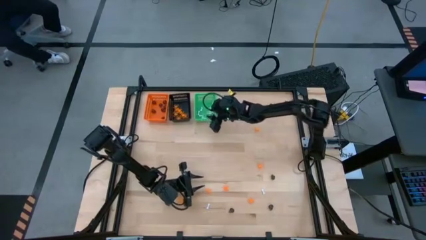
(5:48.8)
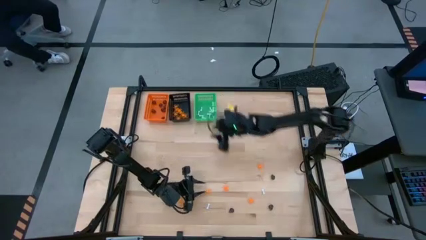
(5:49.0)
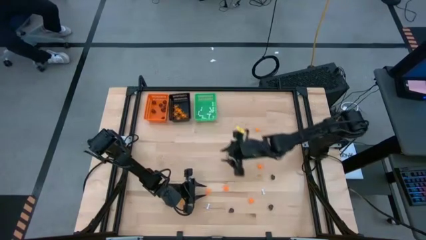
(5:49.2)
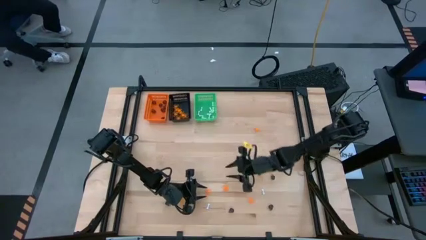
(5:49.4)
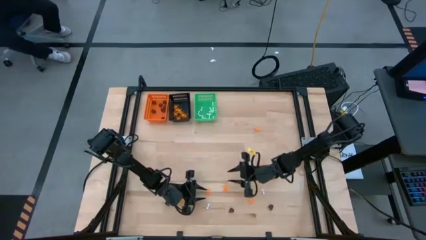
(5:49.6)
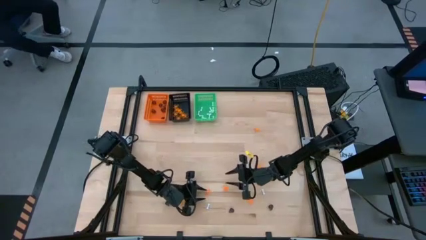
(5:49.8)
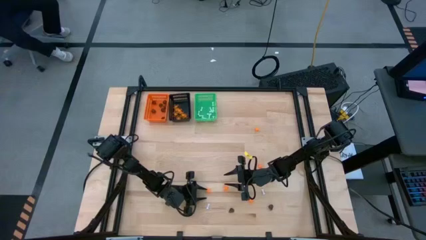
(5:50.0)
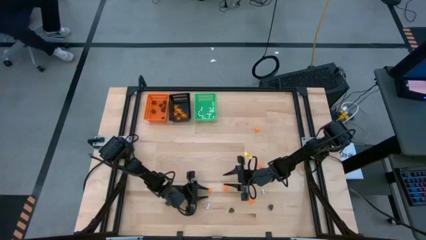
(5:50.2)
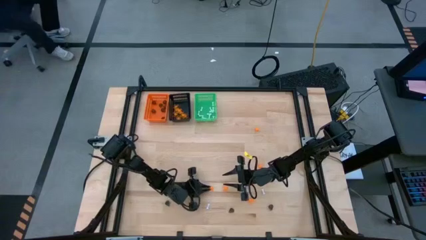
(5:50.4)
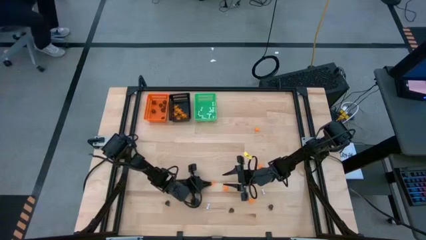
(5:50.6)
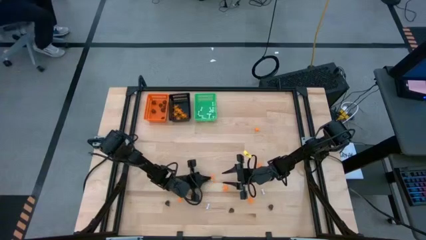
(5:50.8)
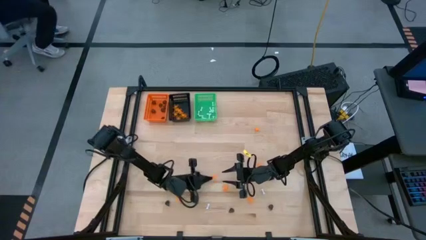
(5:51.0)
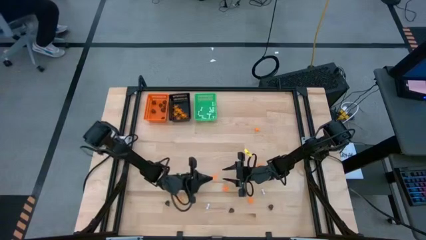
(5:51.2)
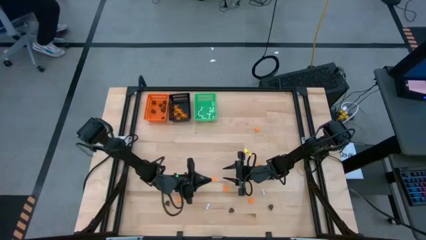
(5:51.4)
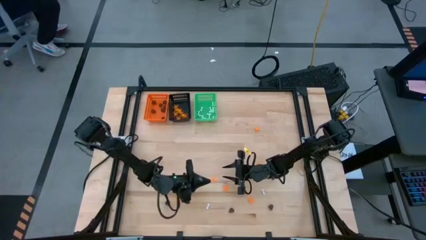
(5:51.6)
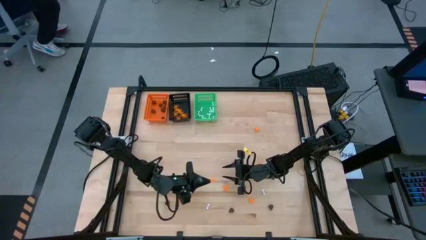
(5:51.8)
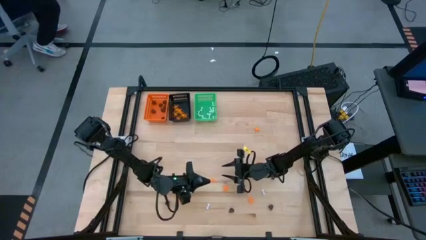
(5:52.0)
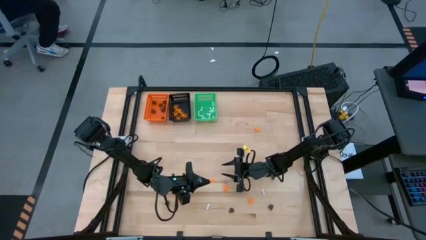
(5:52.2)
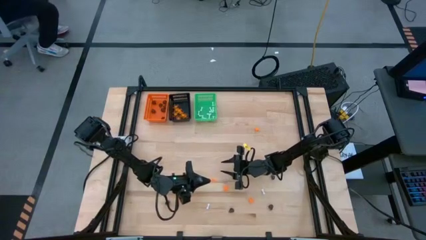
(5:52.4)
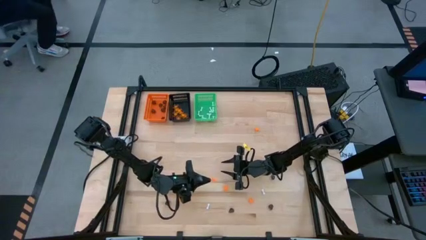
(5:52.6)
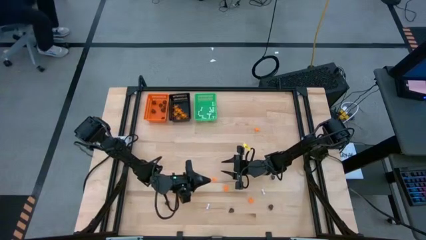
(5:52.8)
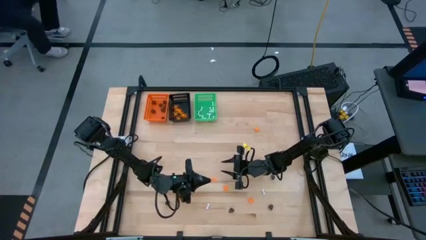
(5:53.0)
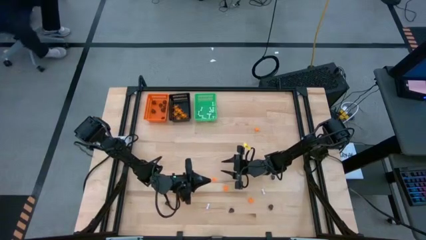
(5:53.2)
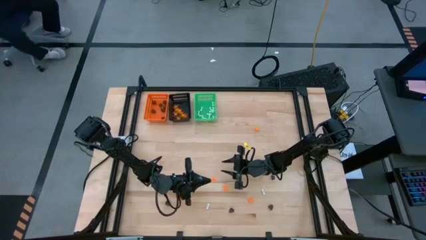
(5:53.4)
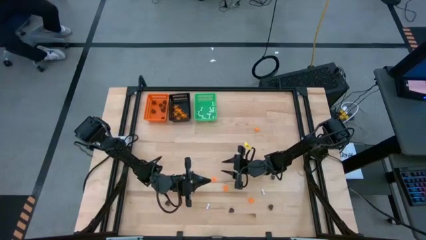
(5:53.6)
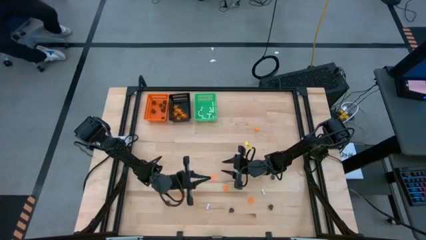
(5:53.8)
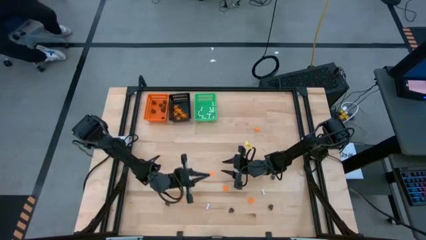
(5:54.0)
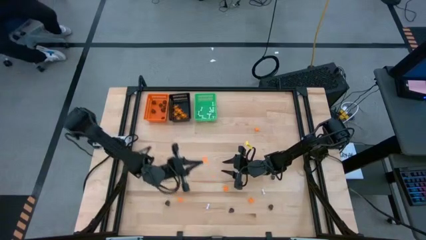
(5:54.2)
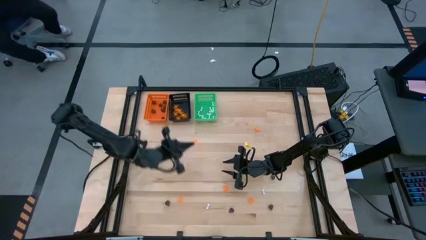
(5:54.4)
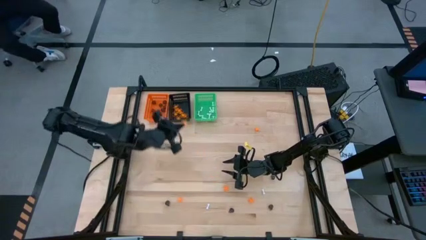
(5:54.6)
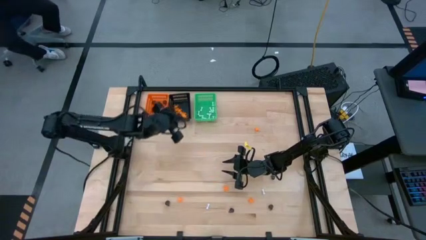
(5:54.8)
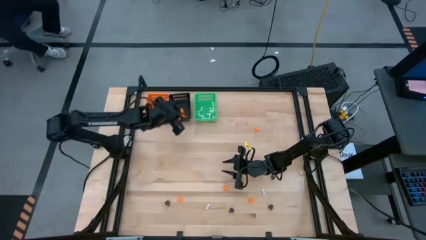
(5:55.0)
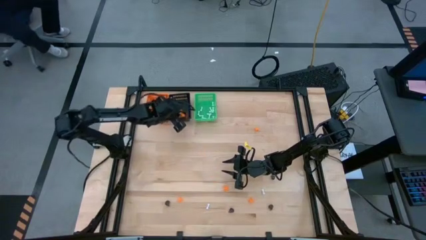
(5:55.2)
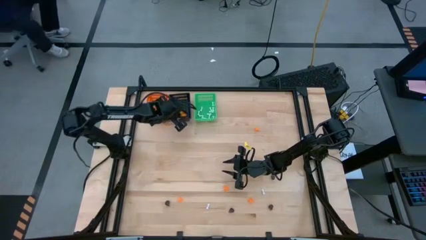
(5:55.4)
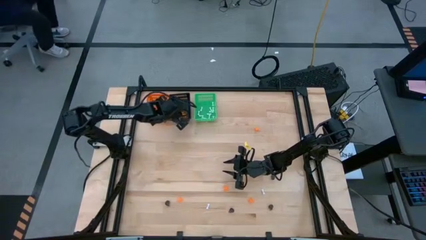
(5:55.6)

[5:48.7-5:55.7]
Task: Sort Halloween decoration
Put the orange spider toy into the black bin

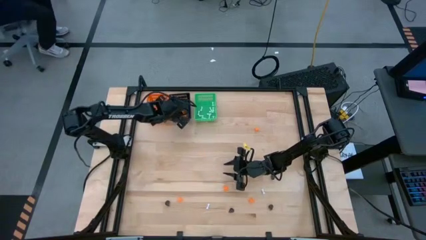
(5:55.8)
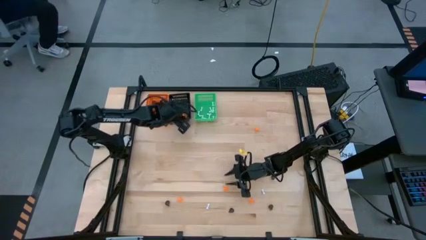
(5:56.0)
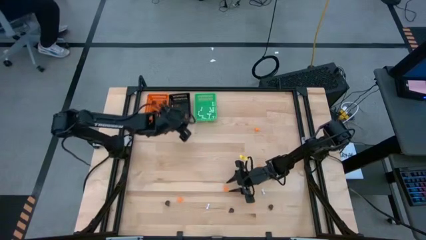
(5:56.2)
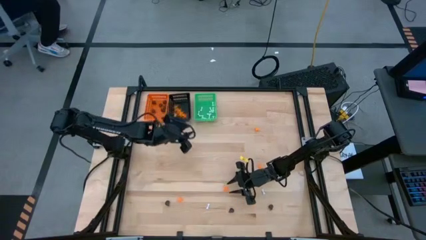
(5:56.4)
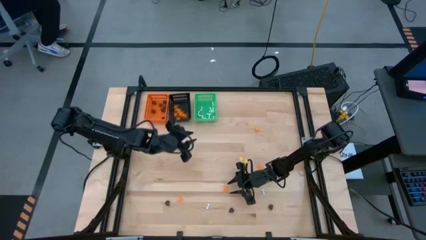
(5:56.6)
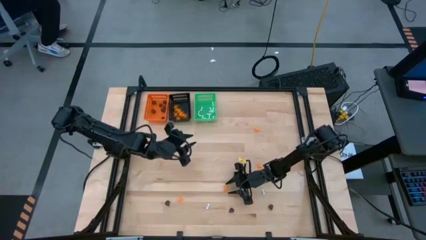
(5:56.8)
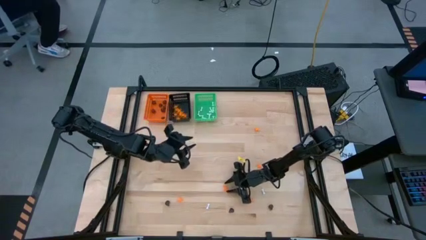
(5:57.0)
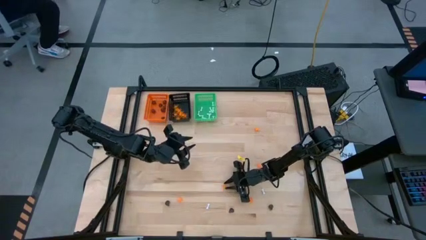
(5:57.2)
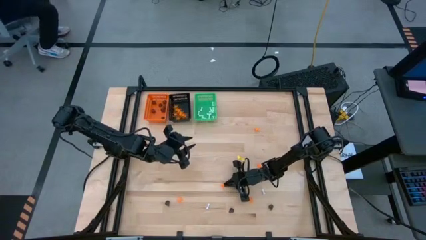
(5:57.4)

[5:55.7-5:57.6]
Put the orange spider toy into the black bin

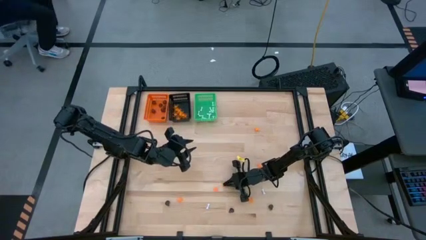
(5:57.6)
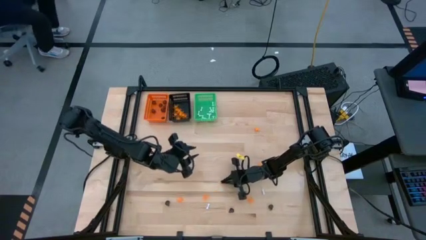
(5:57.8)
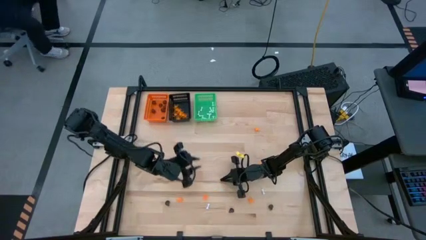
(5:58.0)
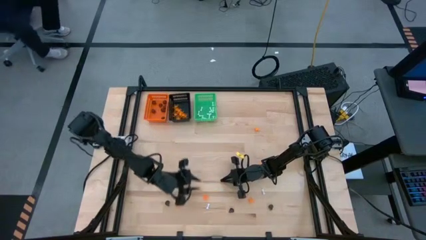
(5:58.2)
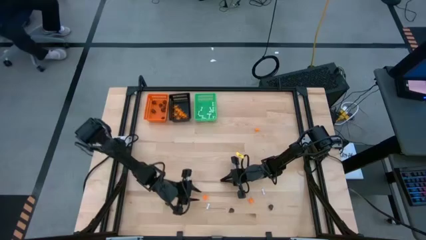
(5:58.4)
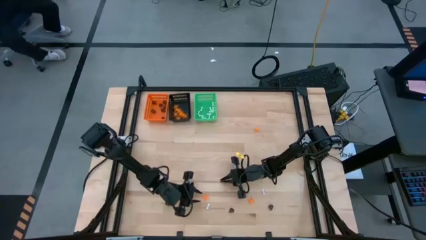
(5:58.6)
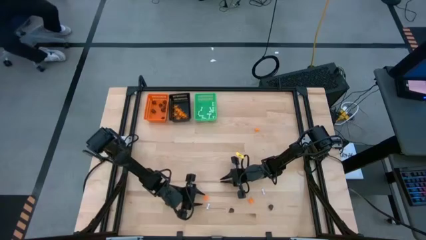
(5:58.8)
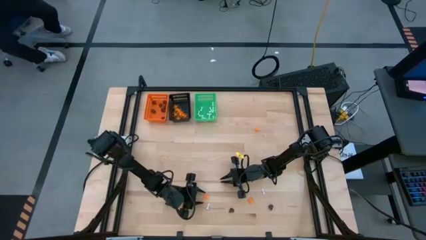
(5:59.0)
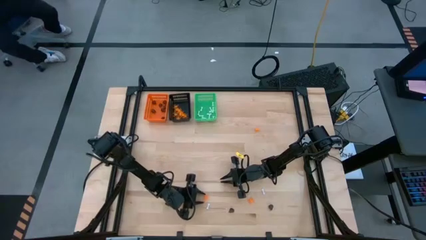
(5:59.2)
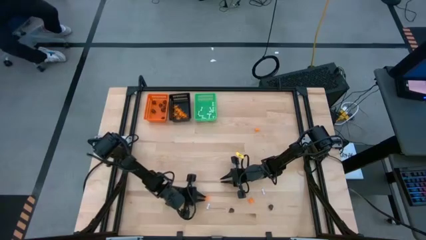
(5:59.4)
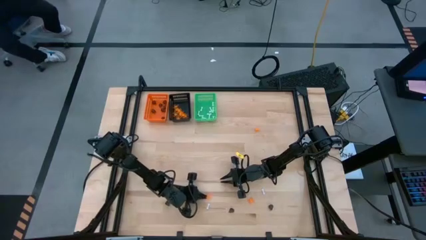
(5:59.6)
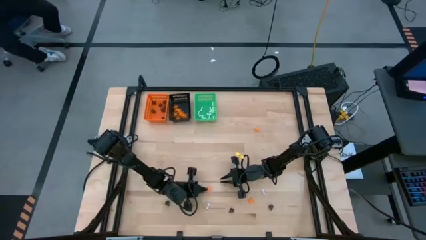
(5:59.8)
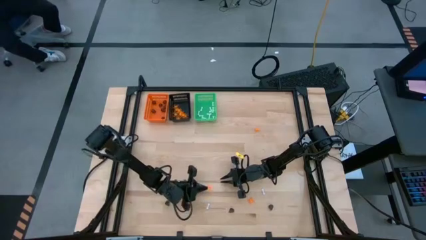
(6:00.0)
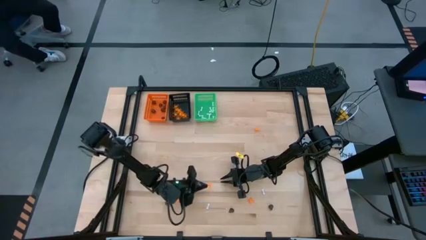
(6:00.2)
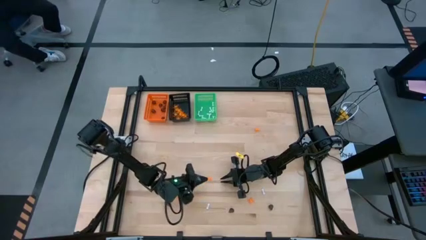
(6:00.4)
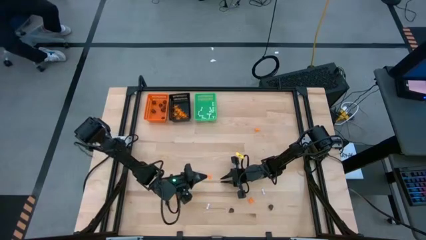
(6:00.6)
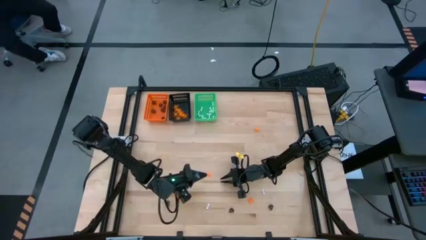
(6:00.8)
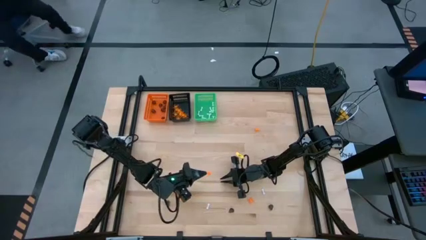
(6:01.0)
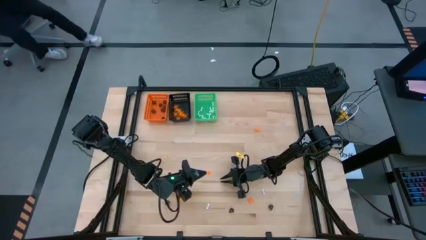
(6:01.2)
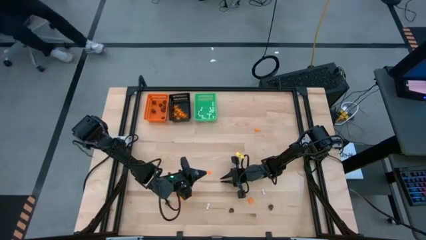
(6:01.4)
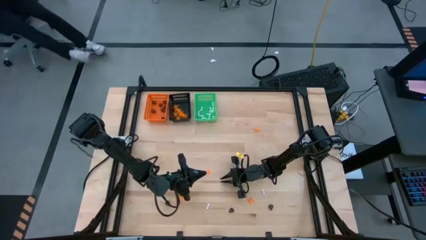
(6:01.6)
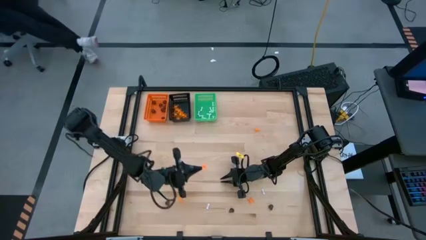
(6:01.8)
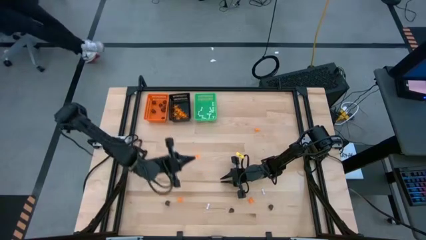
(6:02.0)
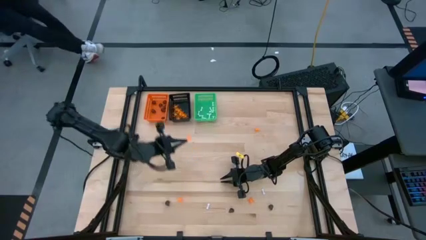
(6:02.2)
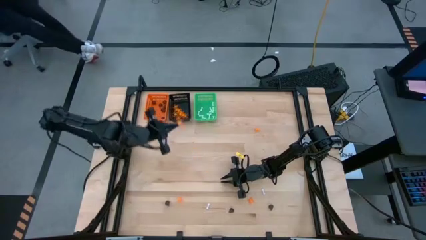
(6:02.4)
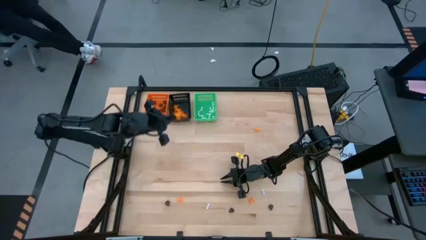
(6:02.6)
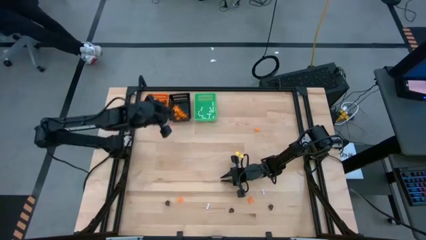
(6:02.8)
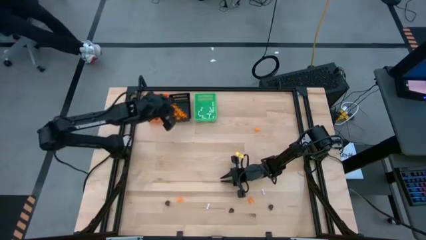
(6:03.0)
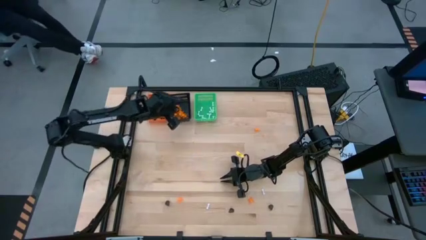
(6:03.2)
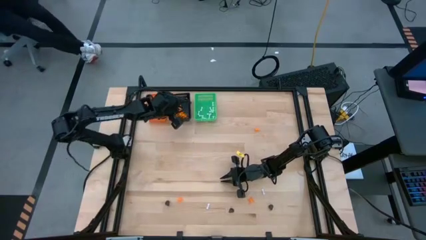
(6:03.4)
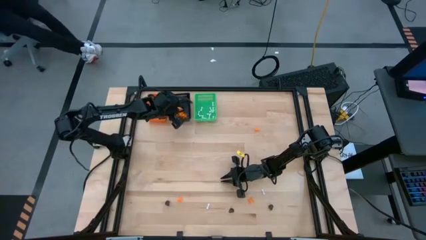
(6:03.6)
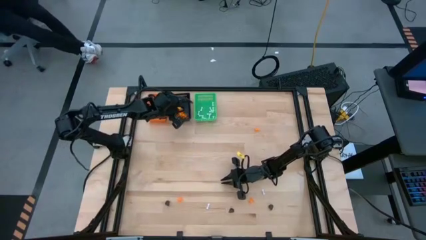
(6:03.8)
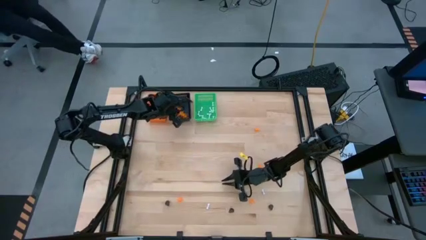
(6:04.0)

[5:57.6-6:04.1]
Put the orange spider toy into the black bin

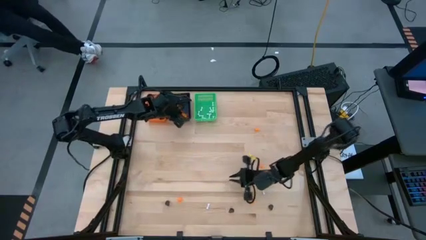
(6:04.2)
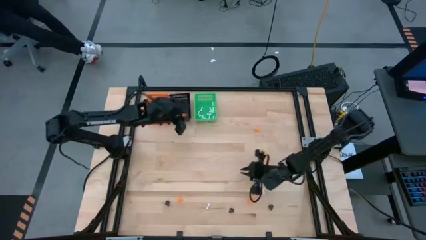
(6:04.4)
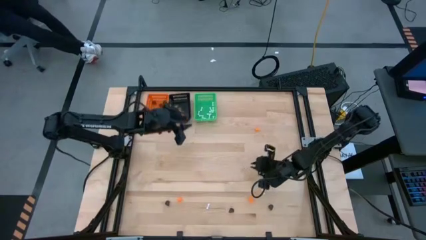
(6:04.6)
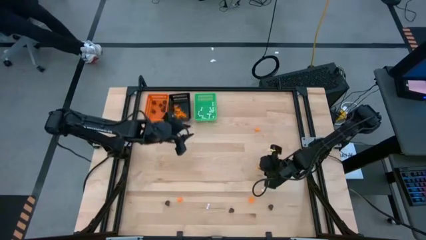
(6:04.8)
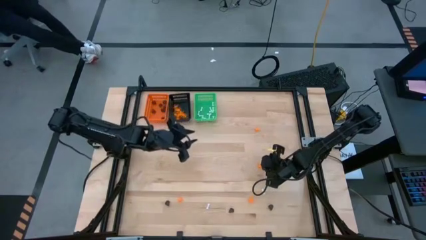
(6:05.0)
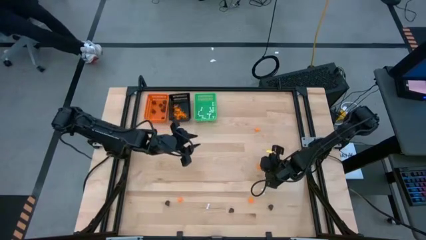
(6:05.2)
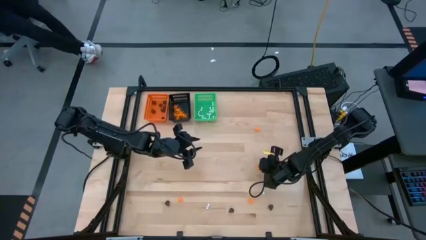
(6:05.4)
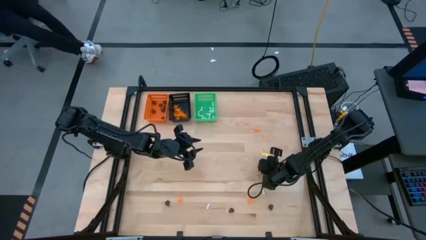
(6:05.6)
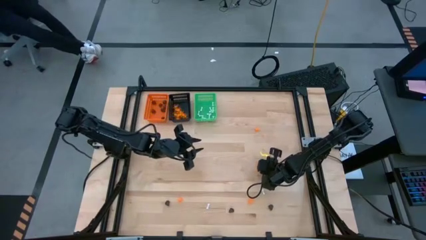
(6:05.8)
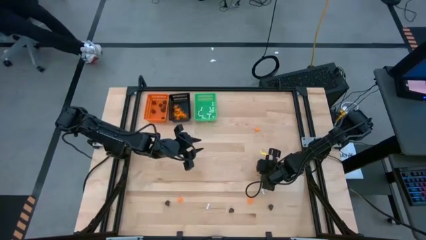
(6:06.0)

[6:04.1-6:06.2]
Put the orange spider toy into the black bin
